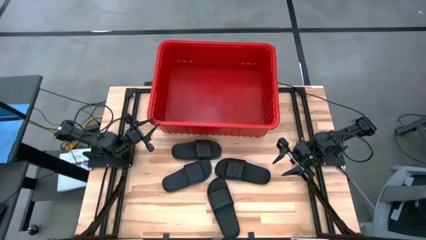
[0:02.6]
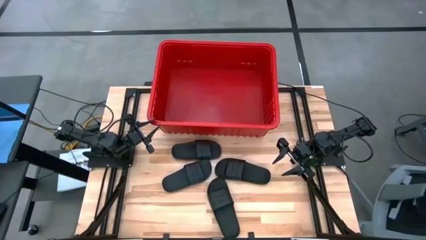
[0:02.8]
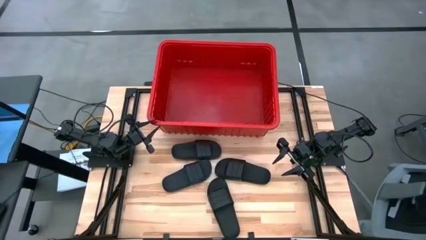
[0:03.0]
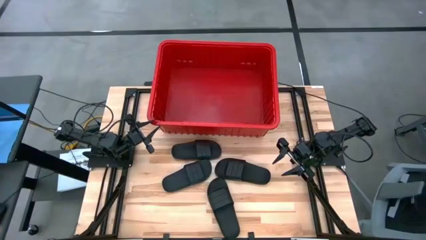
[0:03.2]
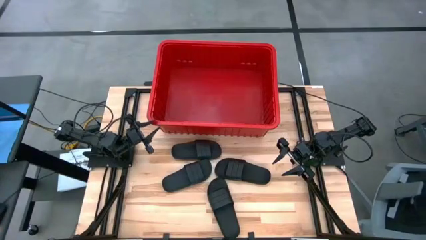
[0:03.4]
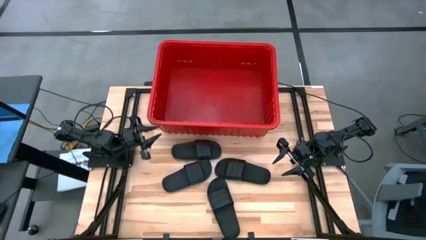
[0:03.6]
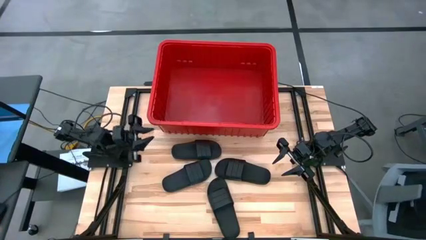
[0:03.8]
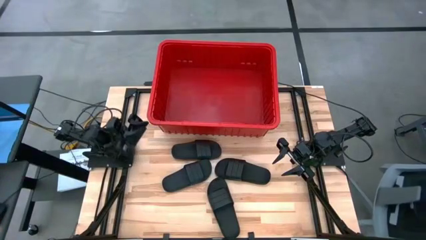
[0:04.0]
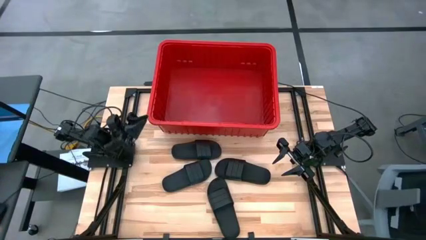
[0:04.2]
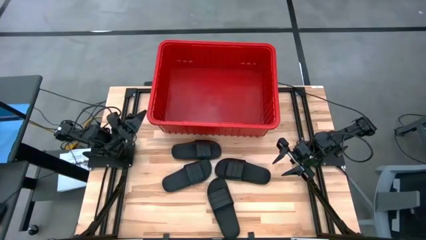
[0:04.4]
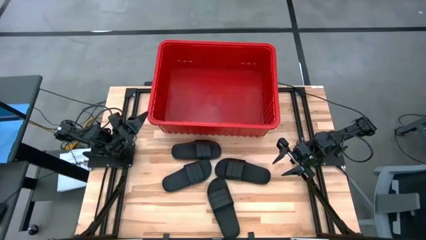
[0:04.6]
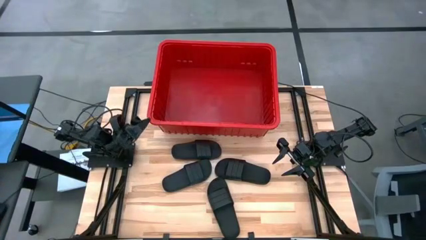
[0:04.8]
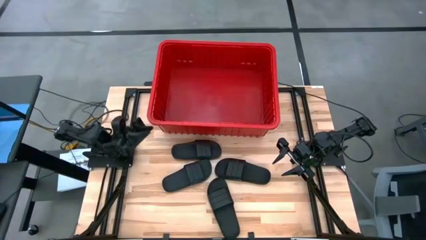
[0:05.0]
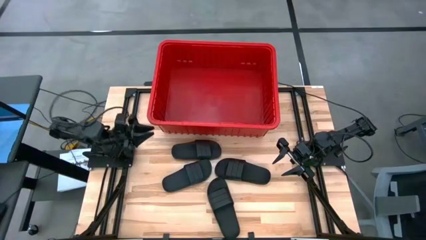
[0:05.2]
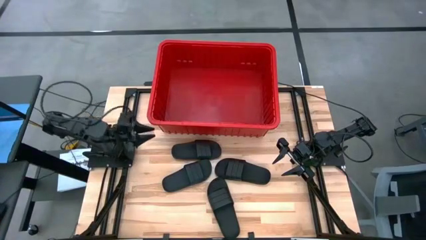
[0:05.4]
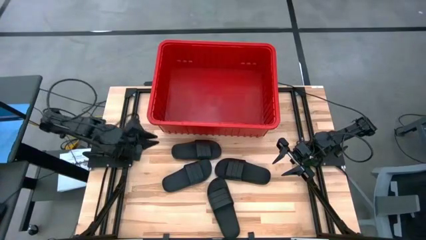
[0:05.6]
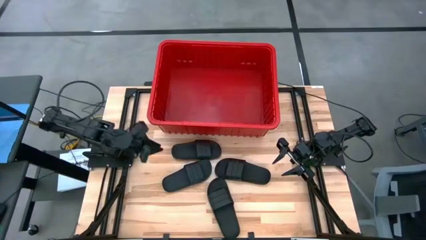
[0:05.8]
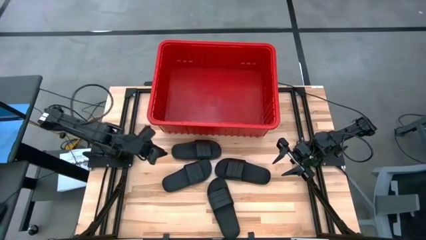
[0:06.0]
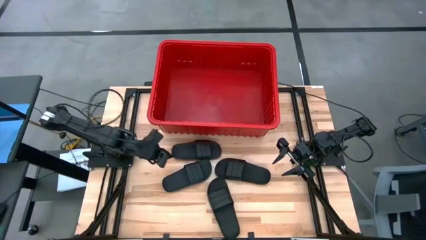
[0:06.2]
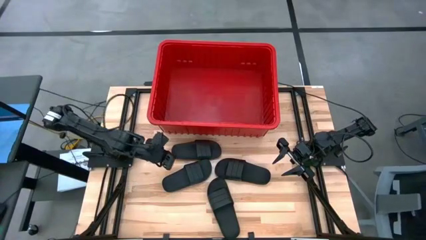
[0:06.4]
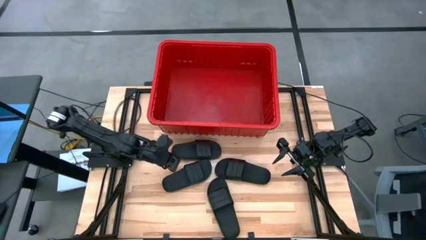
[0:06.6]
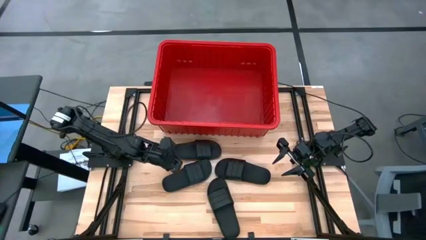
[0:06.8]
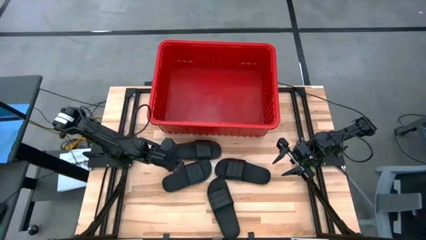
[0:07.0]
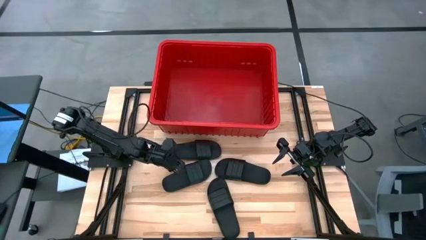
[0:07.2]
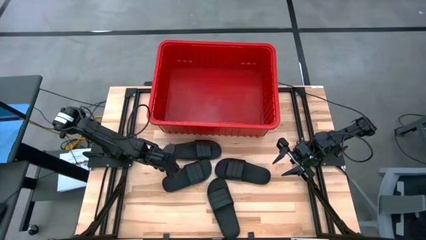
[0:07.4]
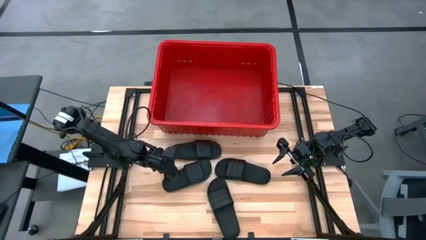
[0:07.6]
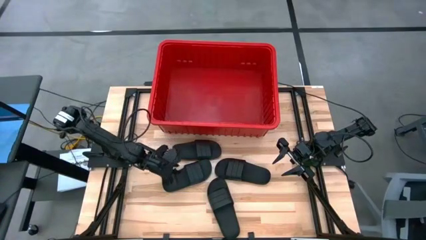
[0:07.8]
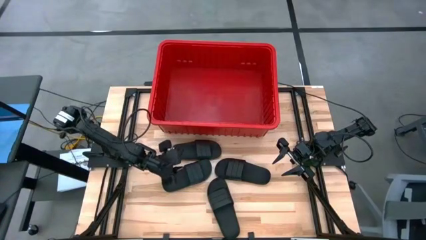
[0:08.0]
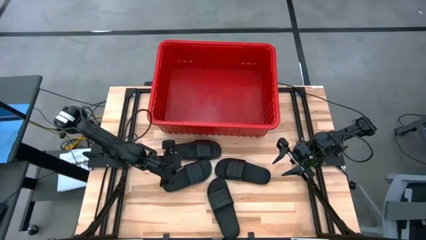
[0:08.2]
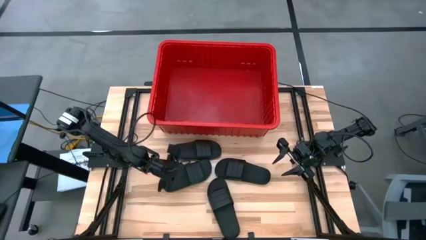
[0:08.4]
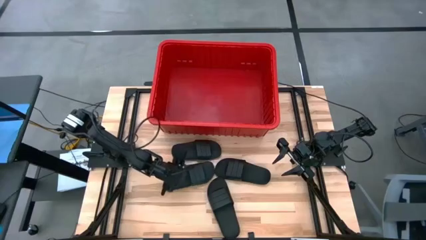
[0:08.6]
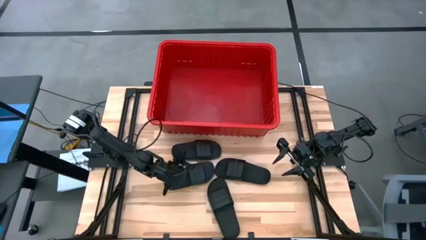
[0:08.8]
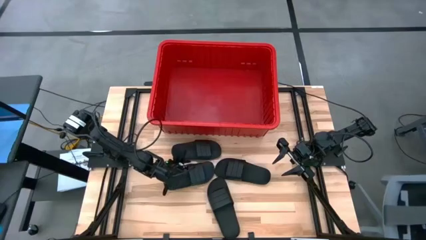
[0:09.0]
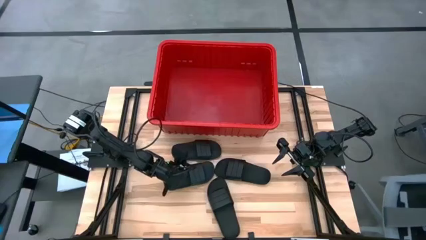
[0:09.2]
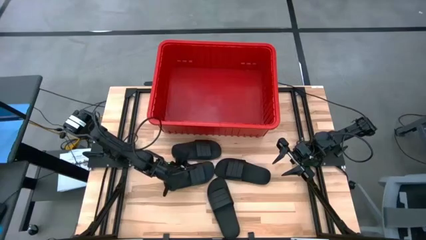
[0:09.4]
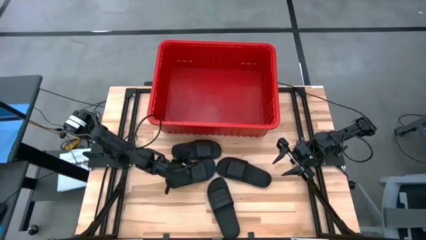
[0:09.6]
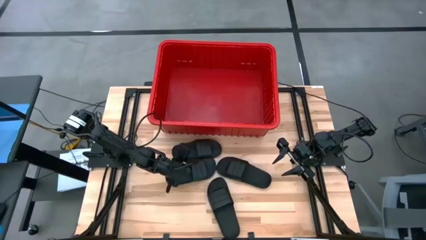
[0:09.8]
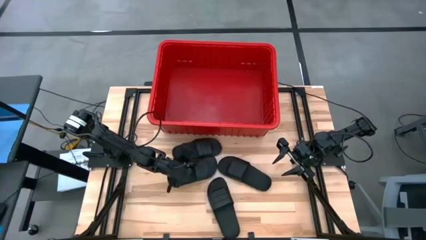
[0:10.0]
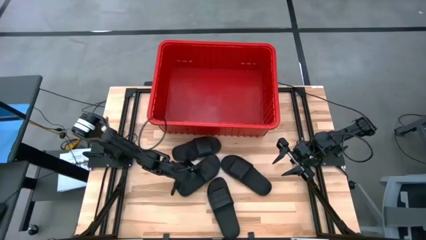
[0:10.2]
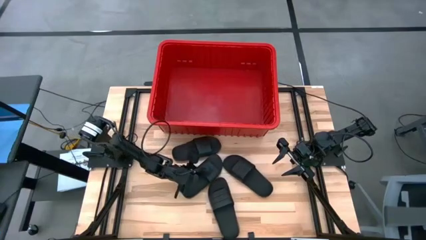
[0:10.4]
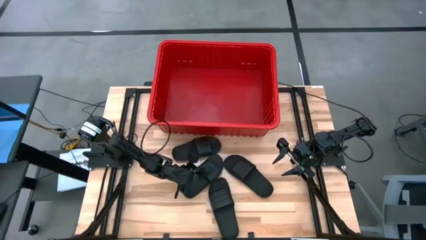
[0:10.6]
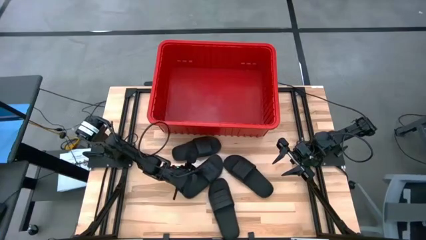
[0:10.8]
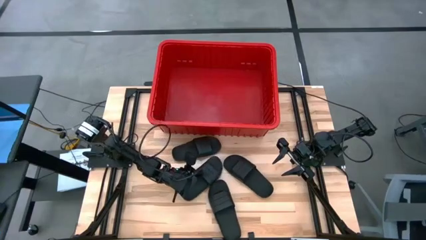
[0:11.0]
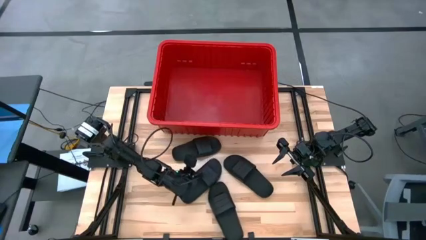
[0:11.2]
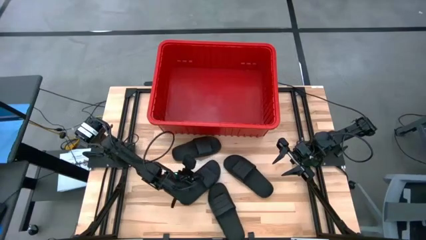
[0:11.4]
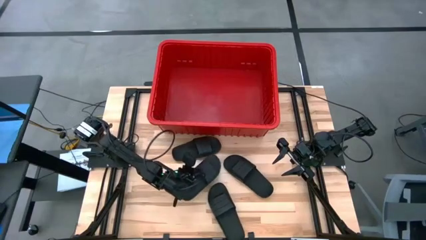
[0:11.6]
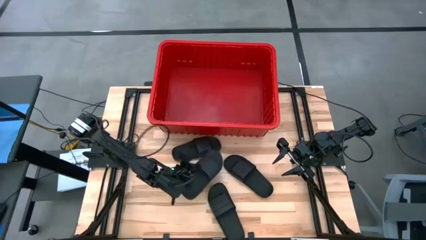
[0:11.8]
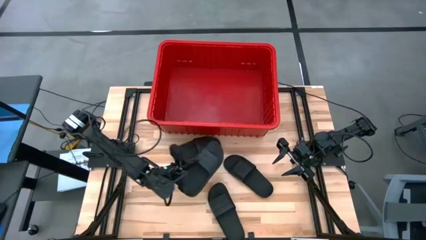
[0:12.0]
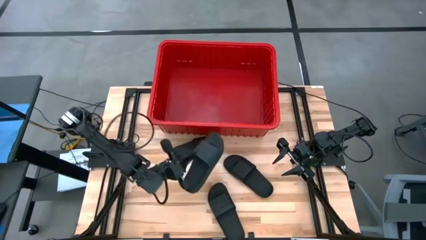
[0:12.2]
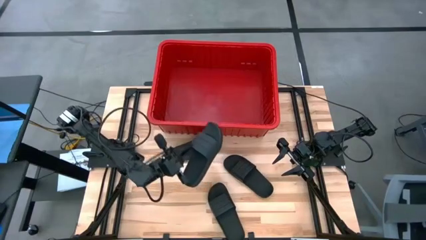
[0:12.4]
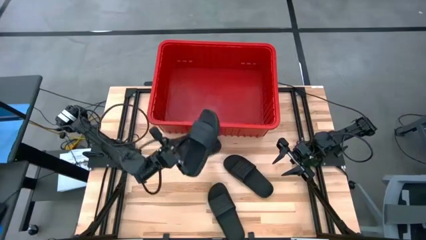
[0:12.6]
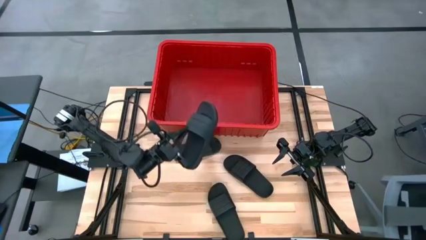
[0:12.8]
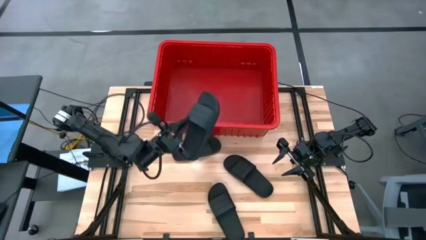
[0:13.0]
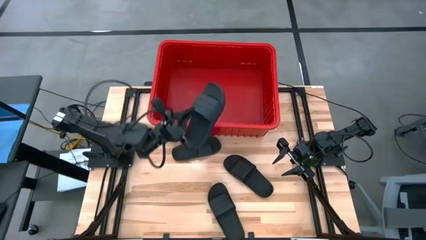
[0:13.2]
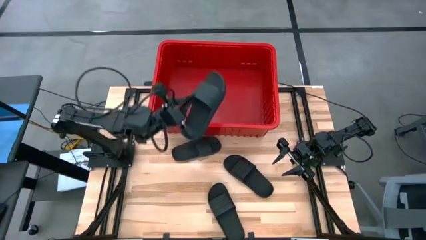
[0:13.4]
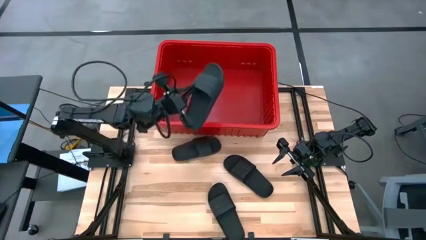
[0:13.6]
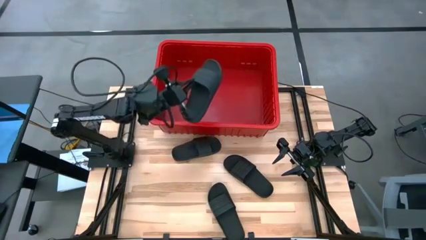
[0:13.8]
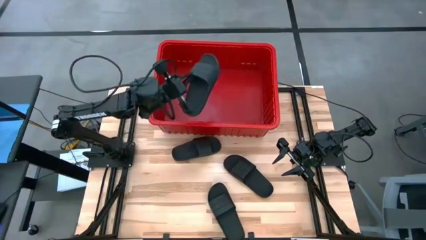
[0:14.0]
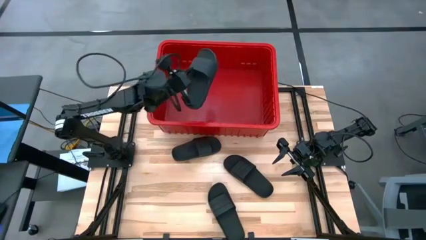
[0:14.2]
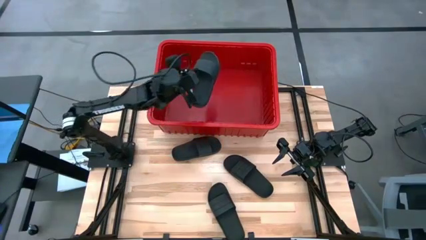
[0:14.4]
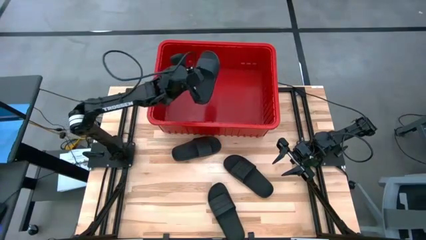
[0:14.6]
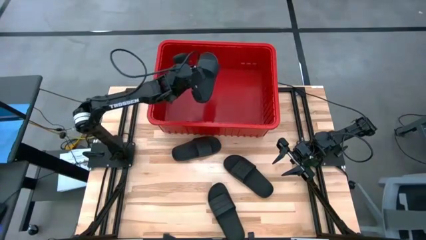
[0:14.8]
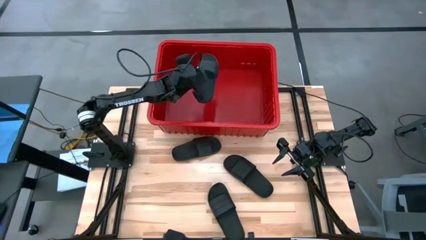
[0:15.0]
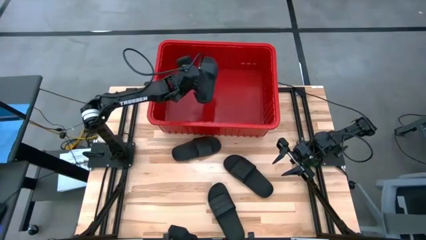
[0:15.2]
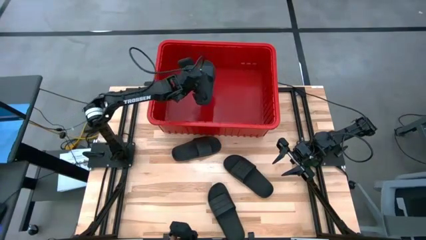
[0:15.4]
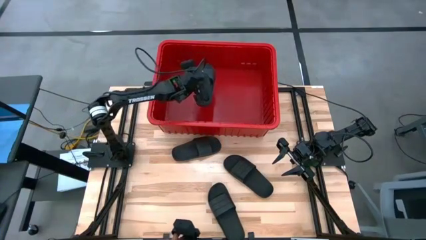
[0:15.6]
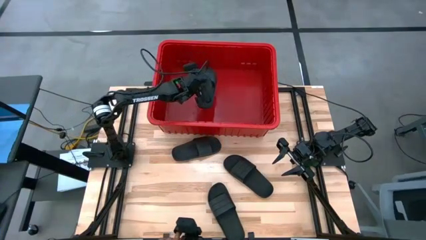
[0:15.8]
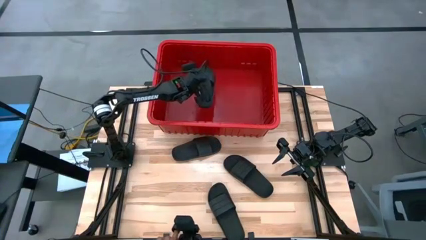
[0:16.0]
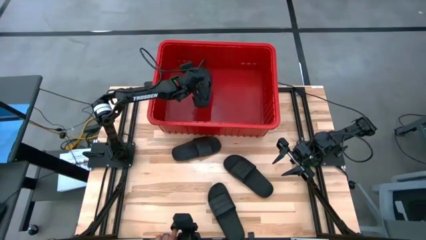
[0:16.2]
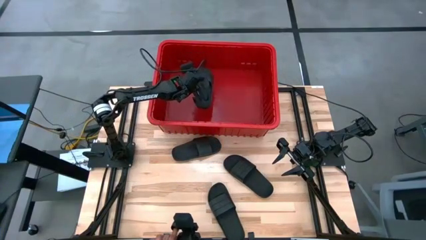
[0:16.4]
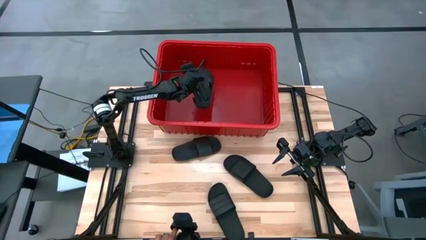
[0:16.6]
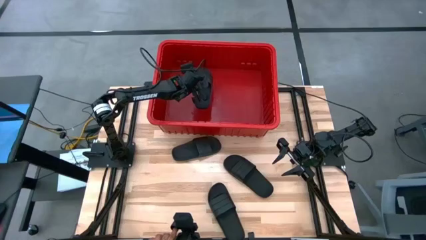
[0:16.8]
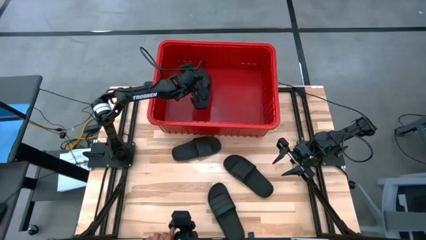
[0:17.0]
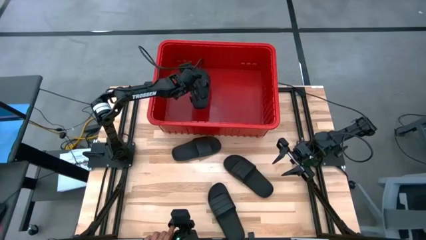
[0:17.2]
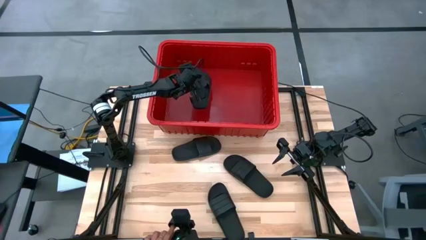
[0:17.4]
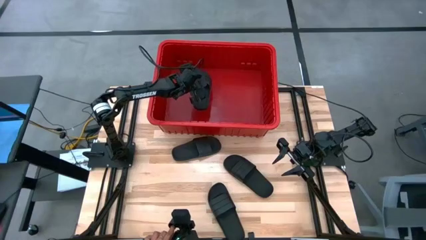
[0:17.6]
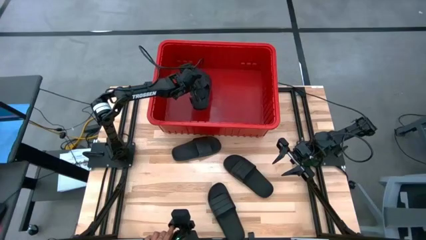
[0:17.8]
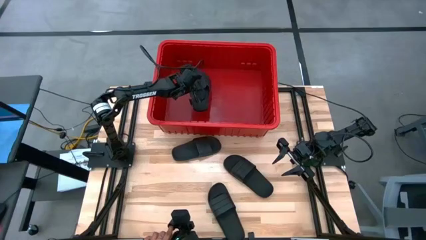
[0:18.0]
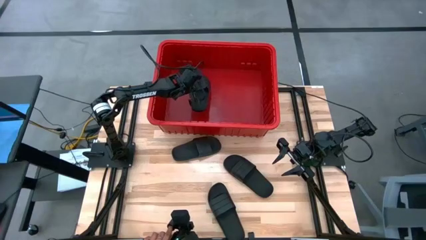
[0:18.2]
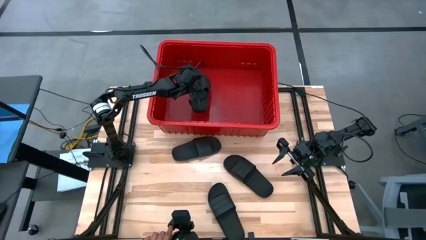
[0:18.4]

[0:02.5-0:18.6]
Task: Pick and place slides into bin
Put the slipper into the organizer bin
